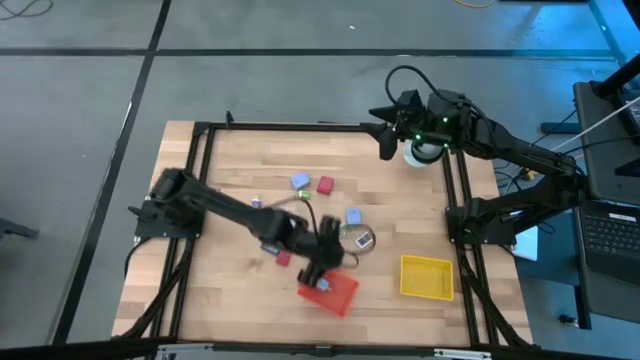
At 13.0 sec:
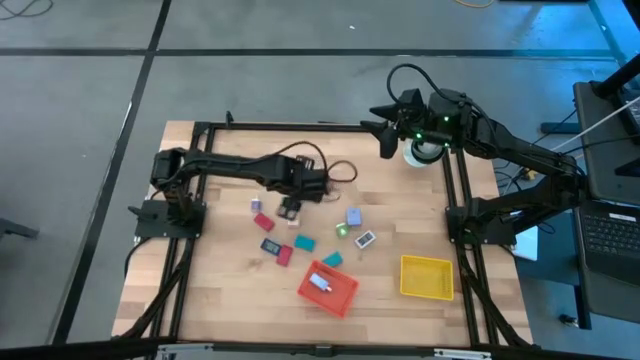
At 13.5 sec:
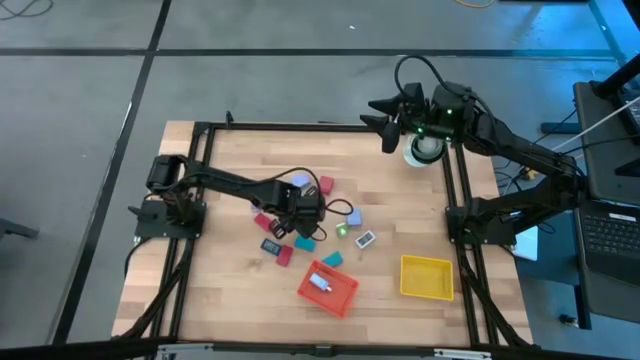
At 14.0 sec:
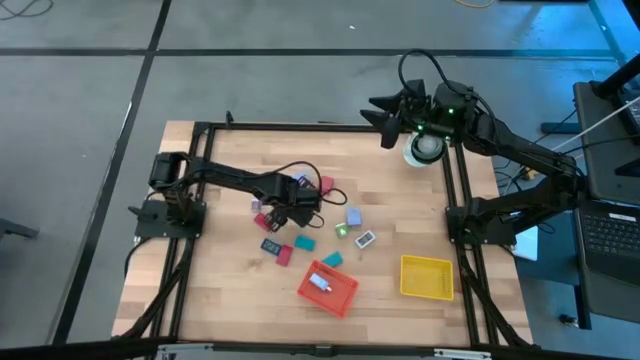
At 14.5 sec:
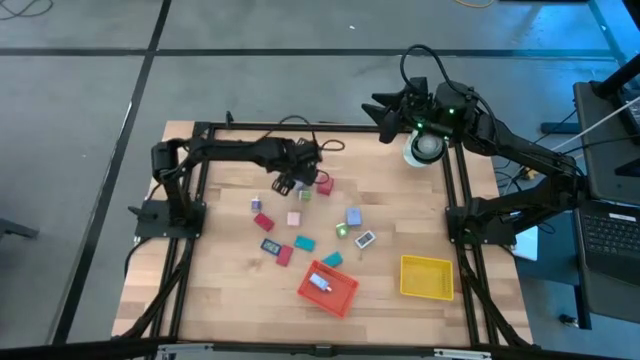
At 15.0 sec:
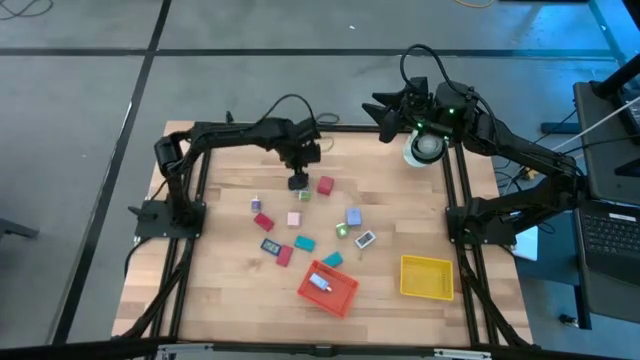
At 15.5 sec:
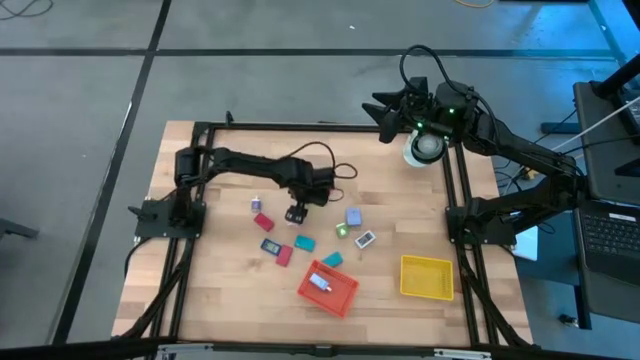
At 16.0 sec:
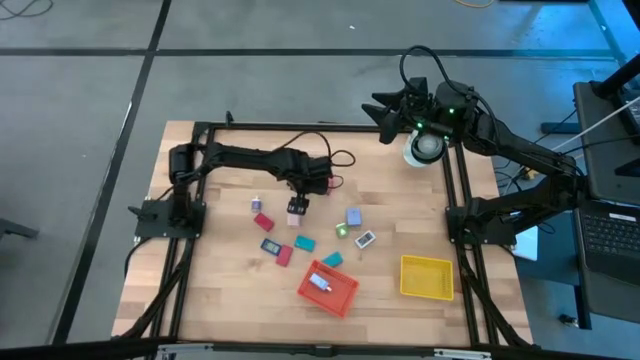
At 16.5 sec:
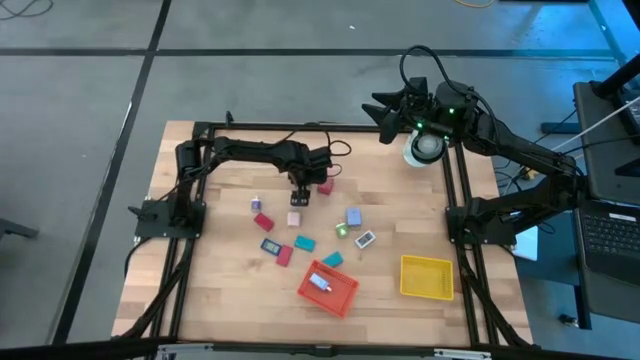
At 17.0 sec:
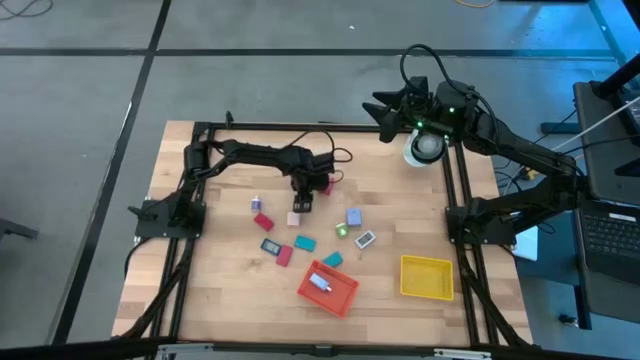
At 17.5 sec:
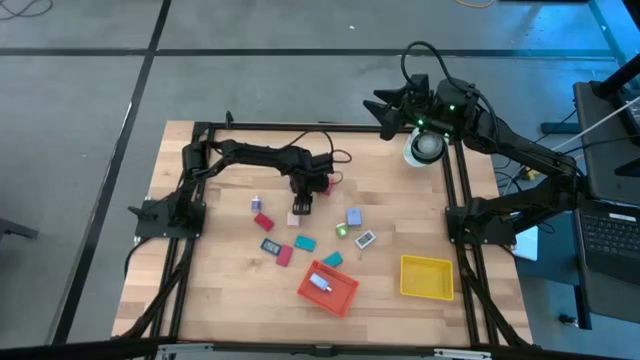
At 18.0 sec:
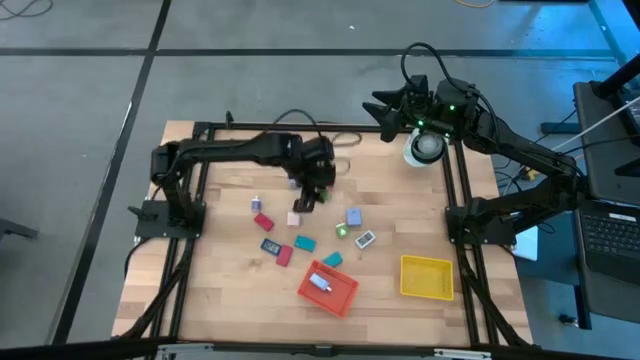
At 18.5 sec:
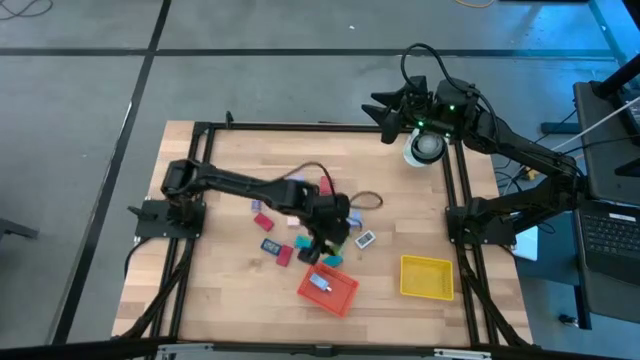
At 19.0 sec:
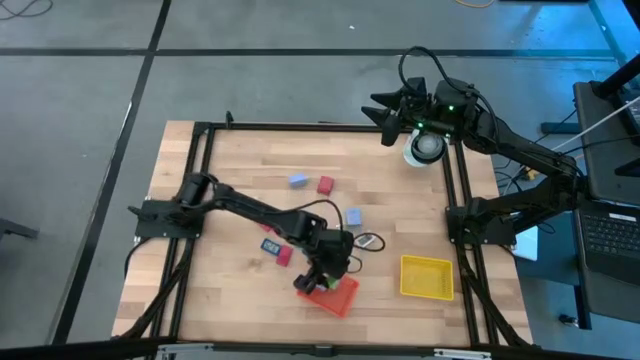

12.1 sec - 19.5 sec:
Task: Pick & Place Office items
Put the top green charger adapter into the orange bin

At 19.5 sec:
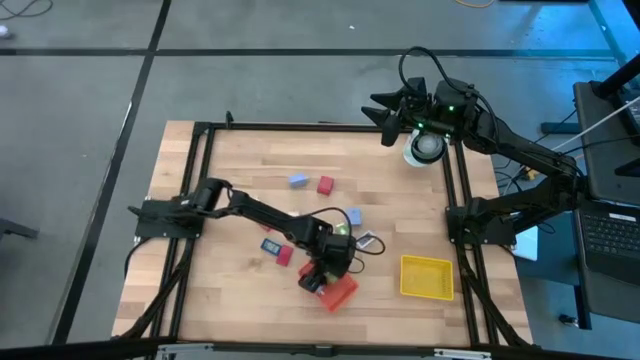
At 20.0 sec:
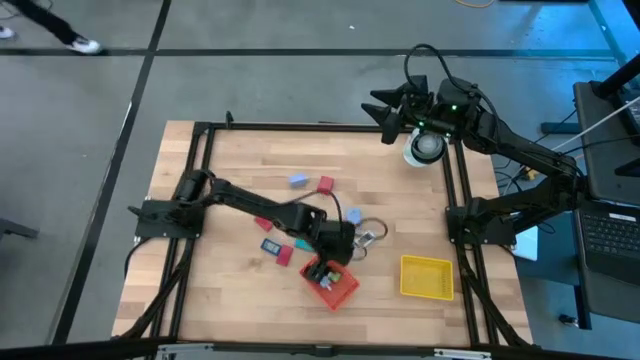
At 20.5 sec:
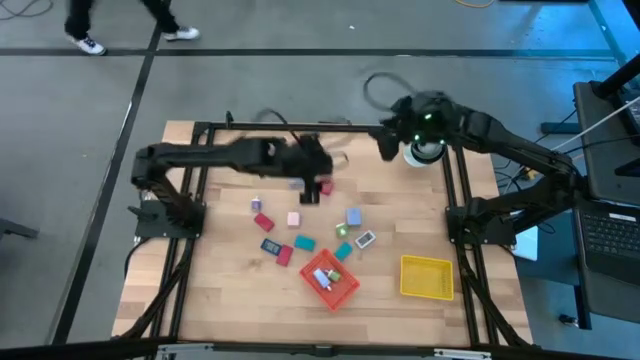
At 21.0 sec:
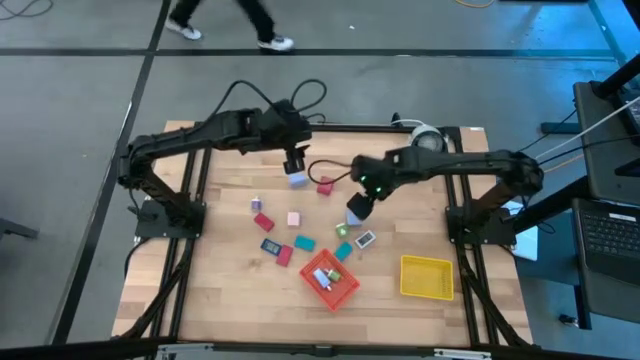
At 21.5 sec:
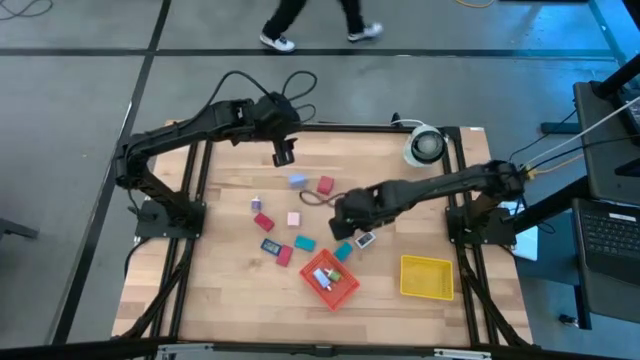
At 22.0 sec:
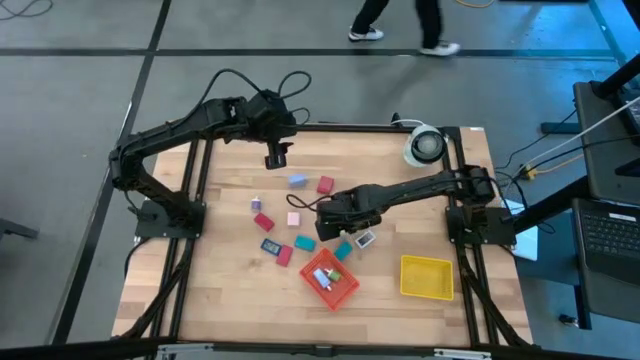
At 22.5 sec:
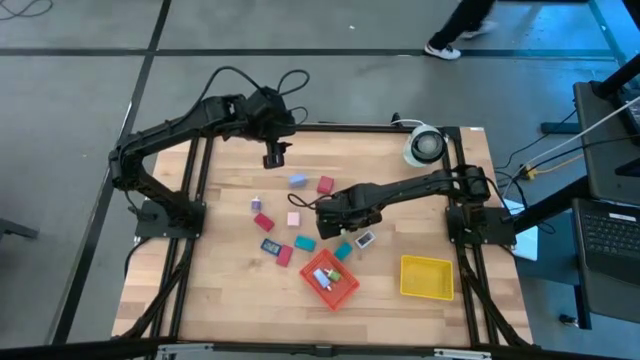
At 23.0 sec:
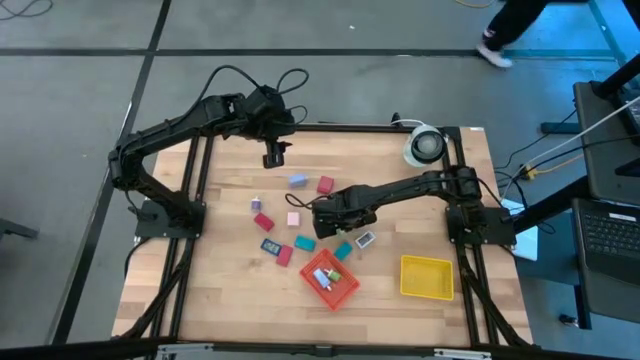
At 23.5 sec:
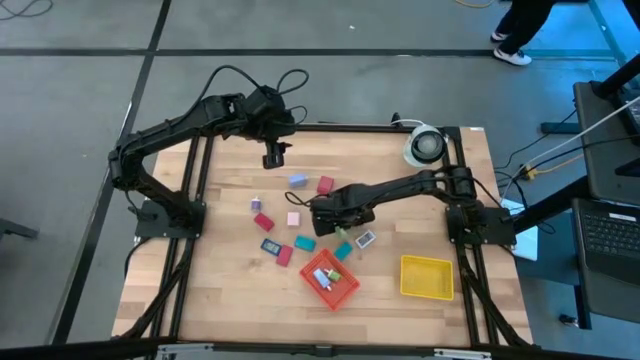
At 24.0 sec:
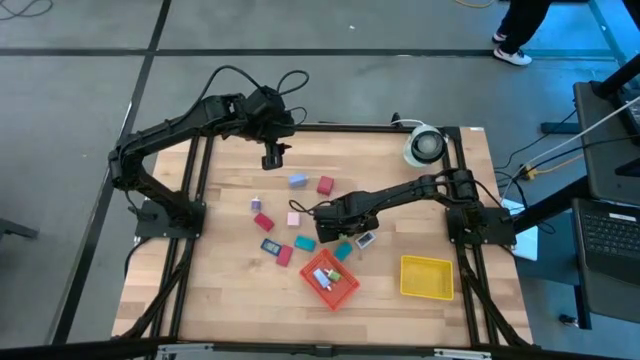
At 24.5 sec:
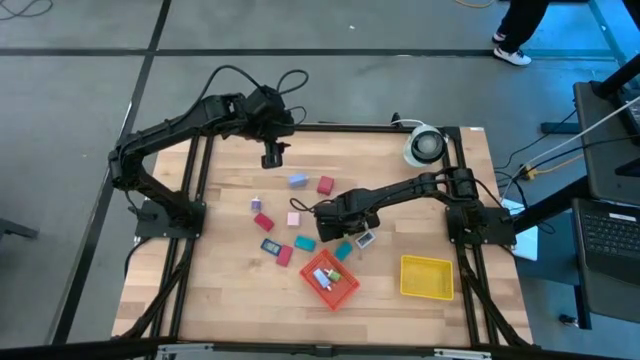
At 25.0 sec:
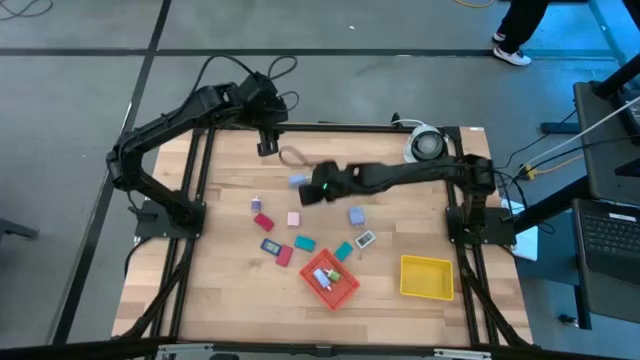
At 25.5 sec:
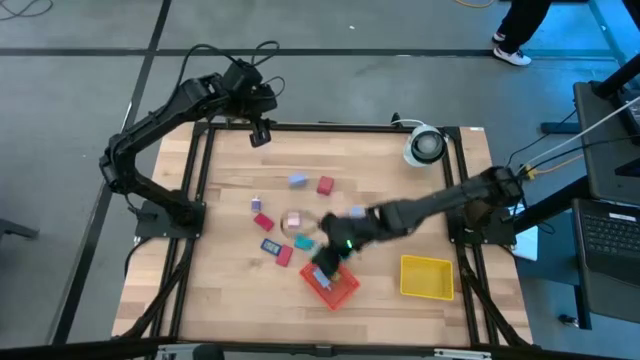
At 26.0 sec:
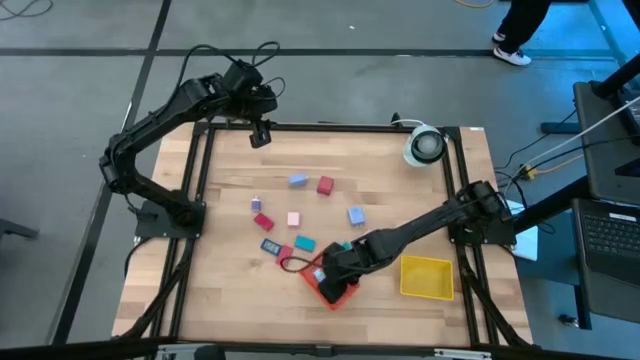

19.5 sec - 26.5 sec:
Put the green charger adapter into the orange bin

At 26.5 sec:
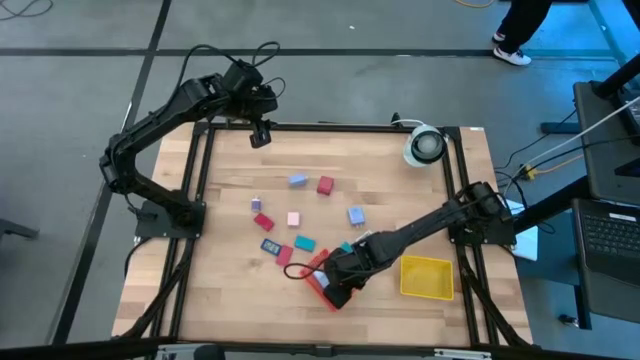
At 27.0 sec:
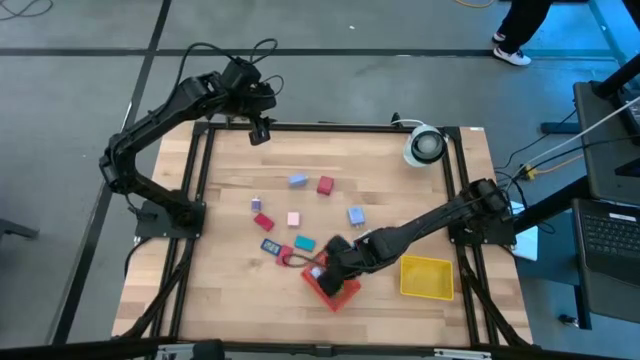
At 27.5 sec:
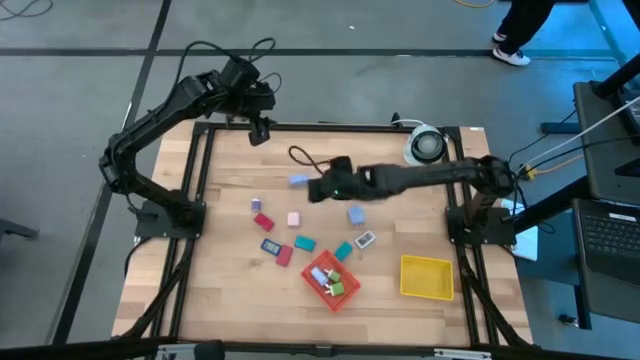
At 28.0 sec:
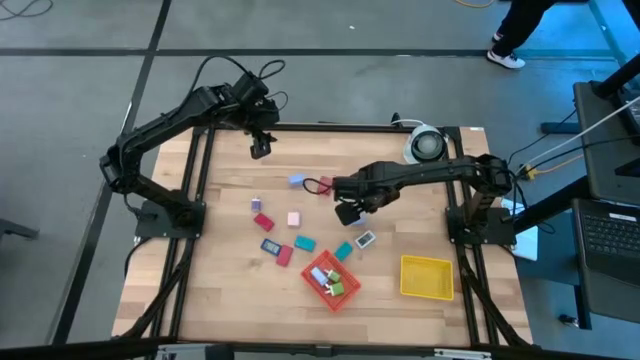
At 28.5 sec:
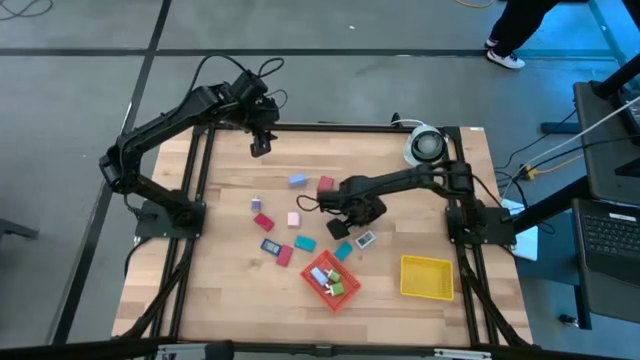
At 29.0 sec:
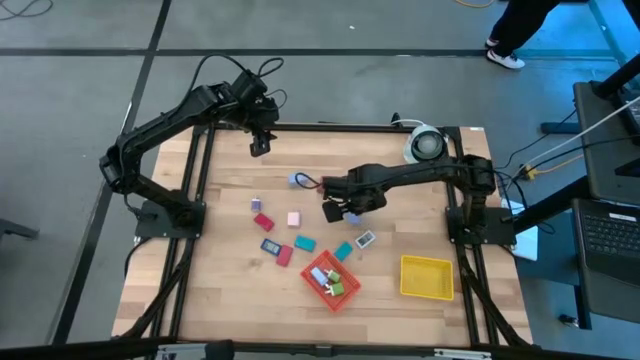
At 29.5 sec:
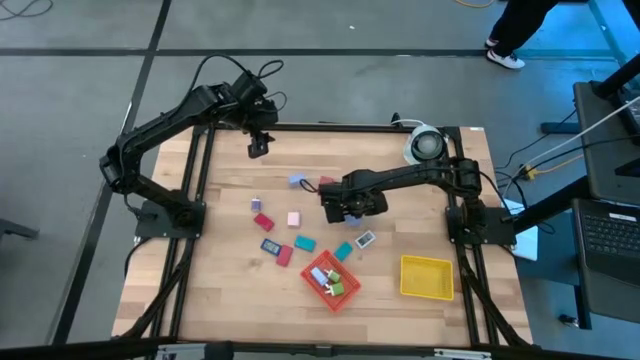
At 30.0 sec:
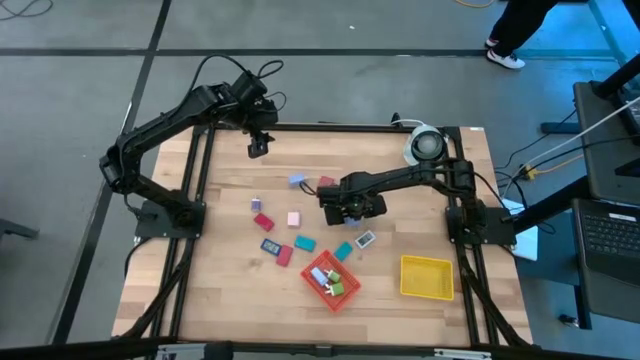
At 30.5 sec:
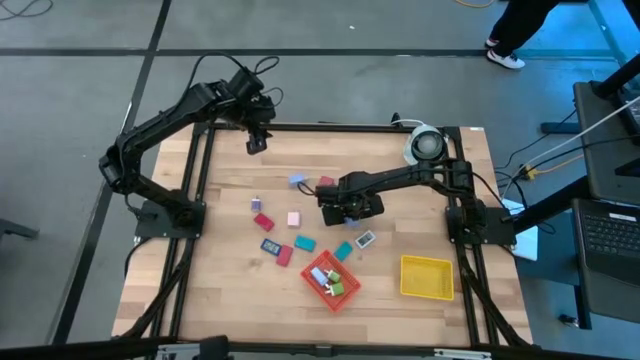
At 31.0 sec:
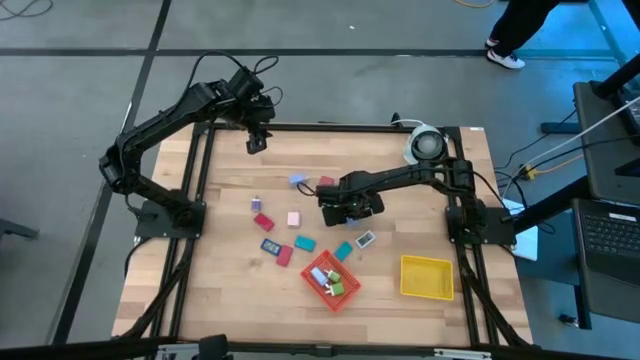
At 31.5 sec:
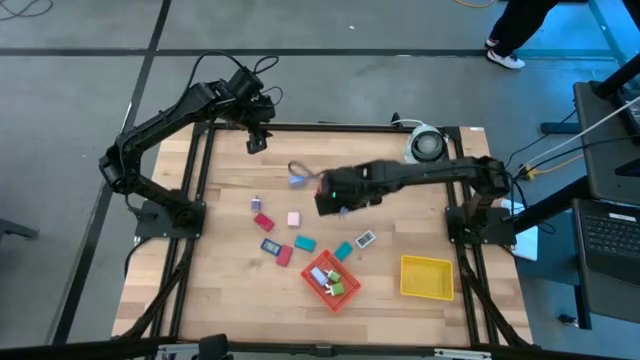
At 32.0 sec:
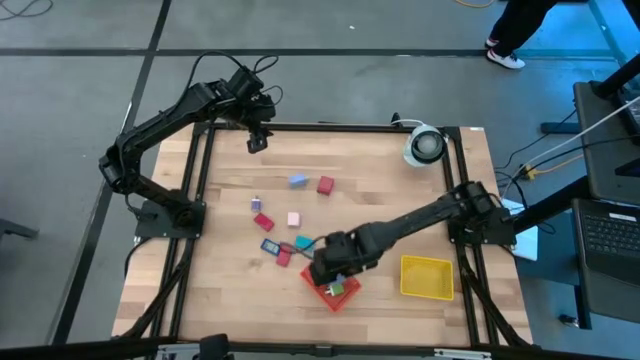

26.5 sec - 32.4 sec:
Put the right light violet charger adapter into the orange bin
